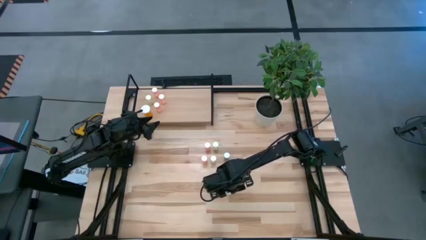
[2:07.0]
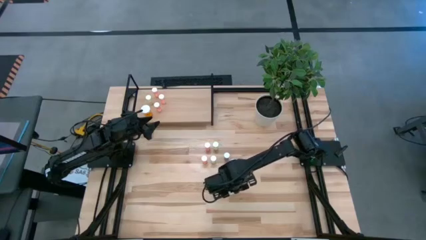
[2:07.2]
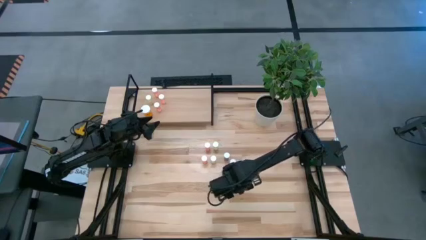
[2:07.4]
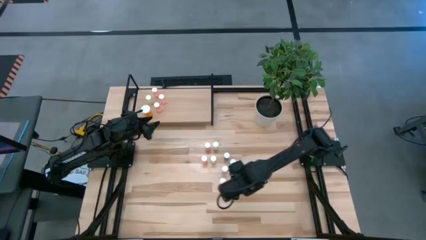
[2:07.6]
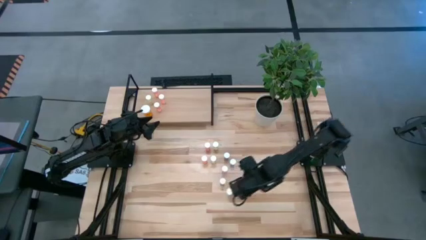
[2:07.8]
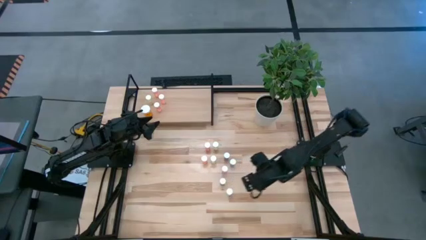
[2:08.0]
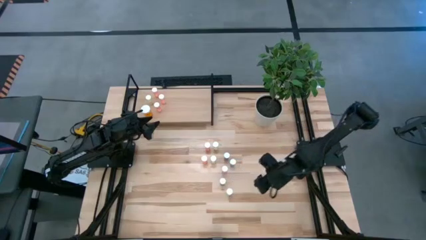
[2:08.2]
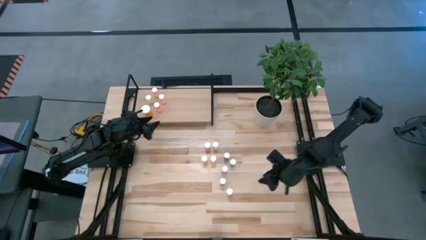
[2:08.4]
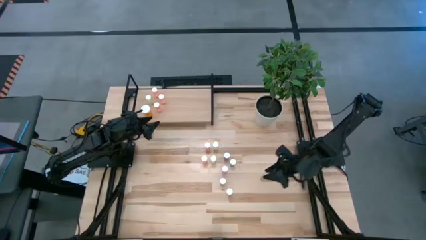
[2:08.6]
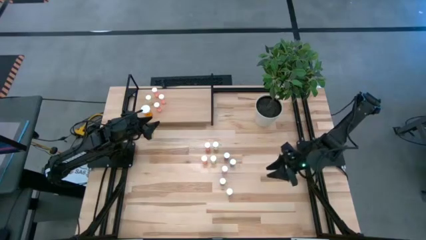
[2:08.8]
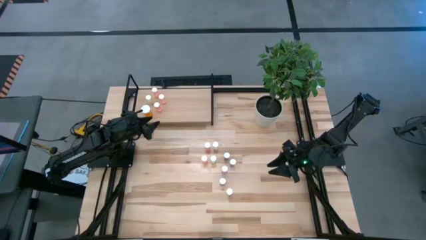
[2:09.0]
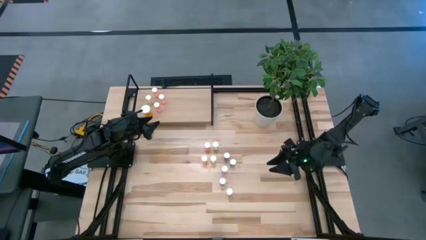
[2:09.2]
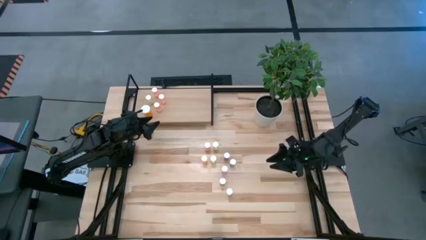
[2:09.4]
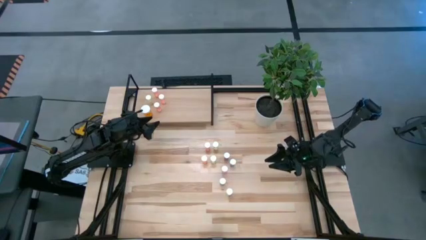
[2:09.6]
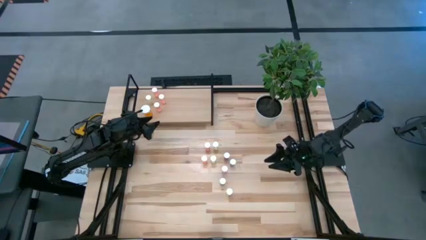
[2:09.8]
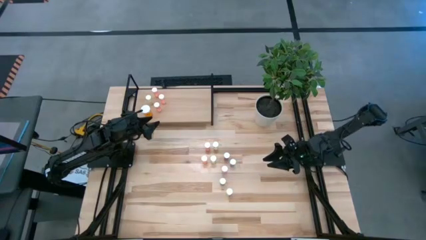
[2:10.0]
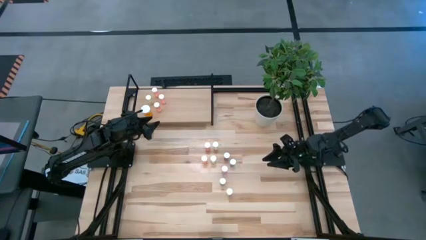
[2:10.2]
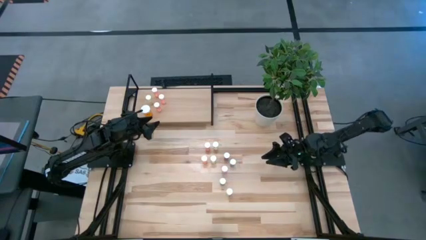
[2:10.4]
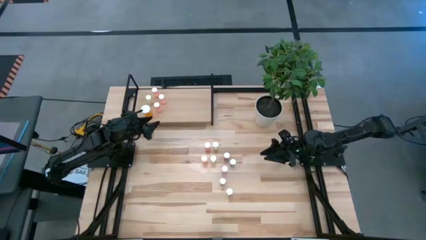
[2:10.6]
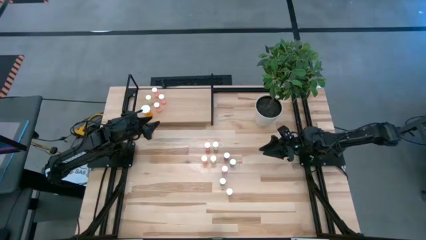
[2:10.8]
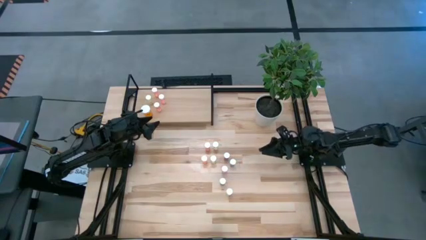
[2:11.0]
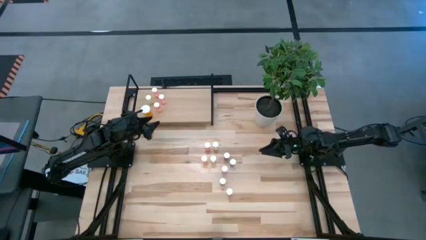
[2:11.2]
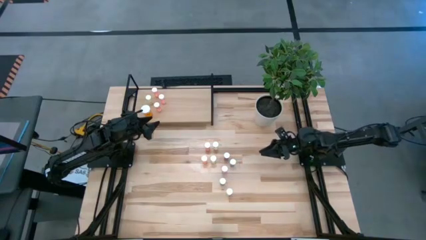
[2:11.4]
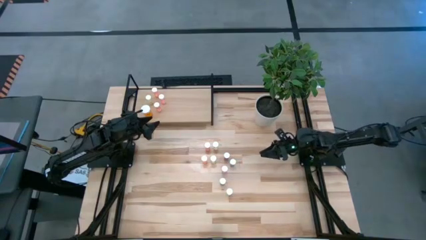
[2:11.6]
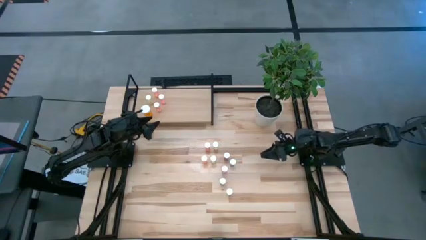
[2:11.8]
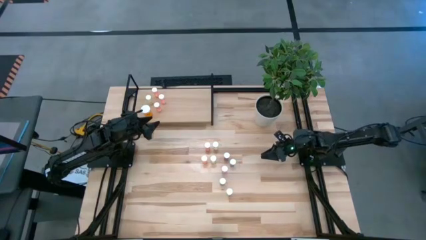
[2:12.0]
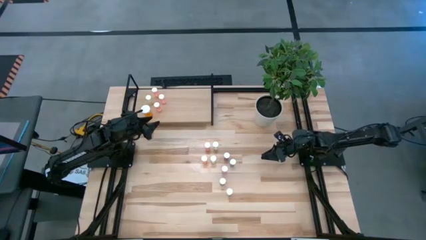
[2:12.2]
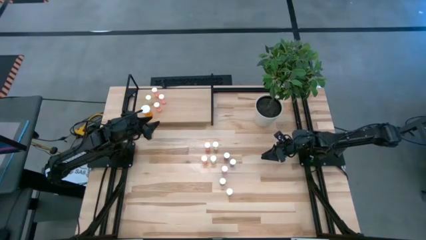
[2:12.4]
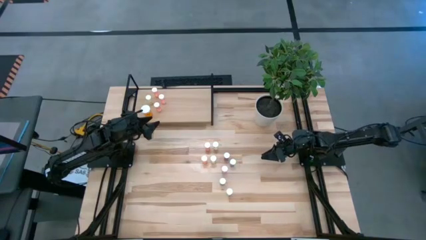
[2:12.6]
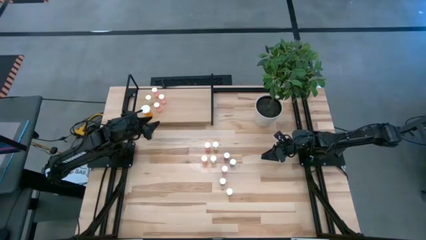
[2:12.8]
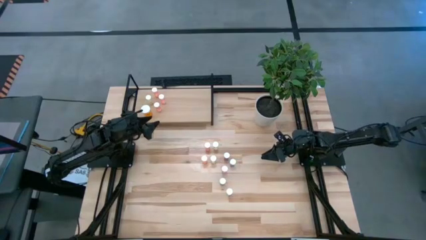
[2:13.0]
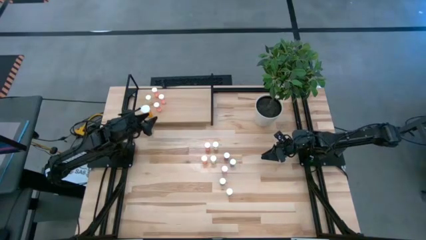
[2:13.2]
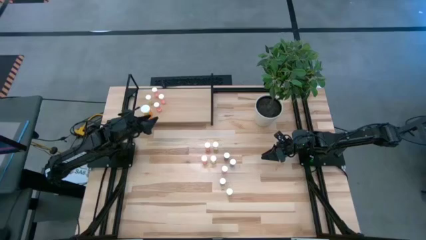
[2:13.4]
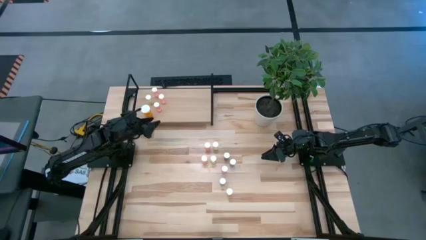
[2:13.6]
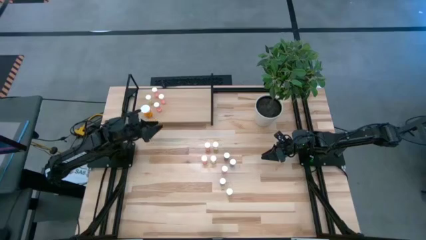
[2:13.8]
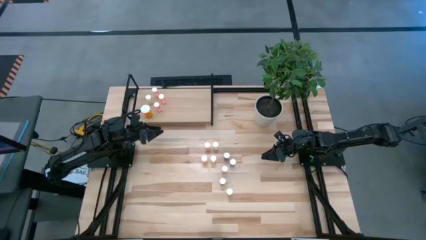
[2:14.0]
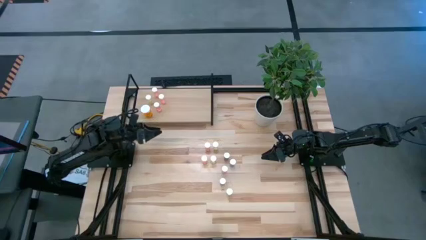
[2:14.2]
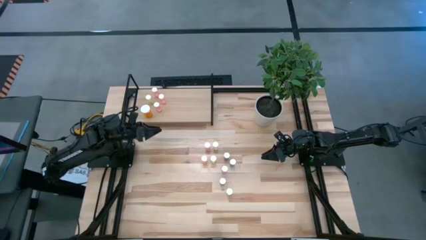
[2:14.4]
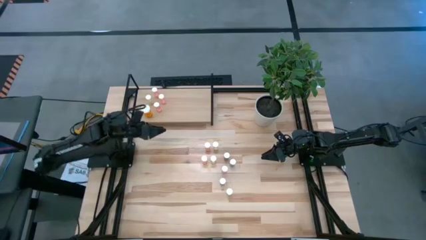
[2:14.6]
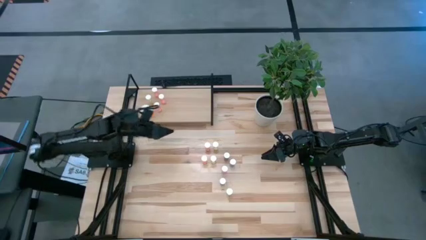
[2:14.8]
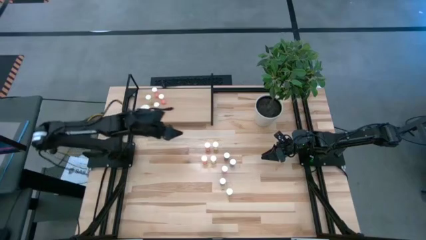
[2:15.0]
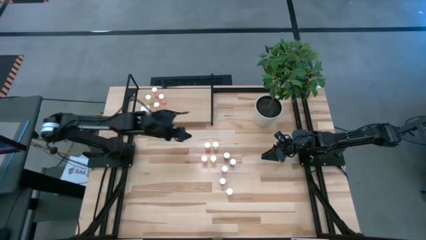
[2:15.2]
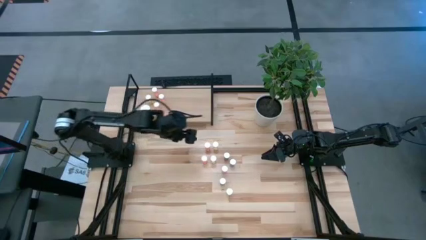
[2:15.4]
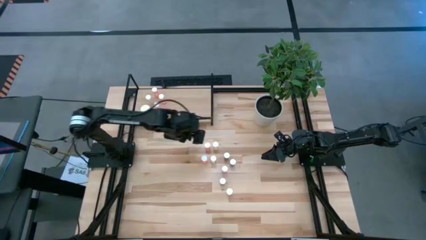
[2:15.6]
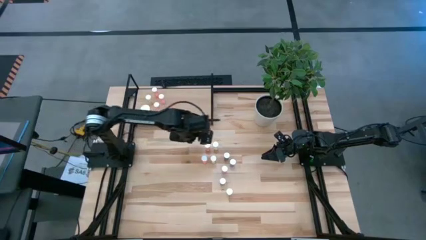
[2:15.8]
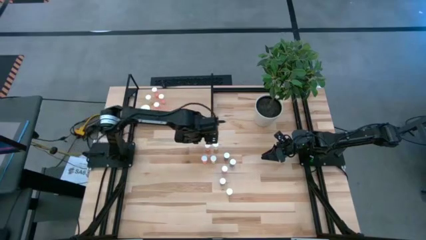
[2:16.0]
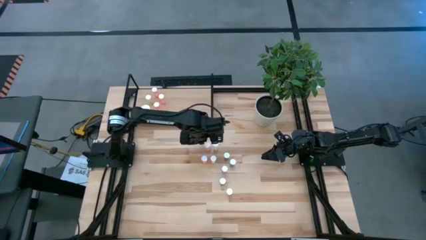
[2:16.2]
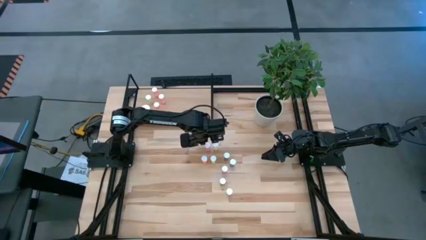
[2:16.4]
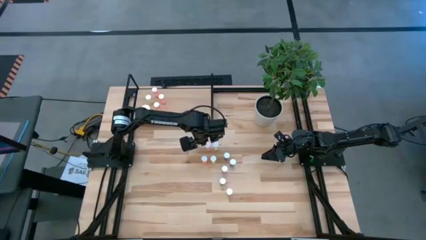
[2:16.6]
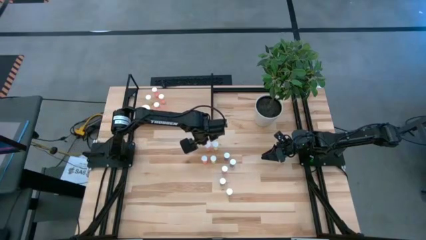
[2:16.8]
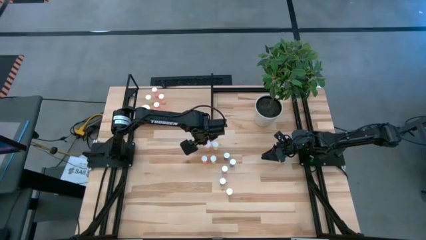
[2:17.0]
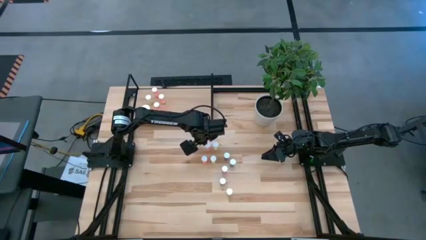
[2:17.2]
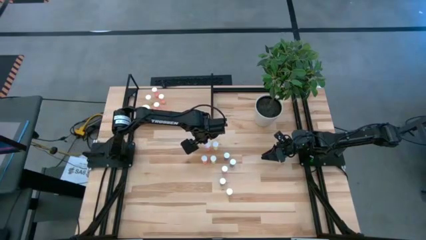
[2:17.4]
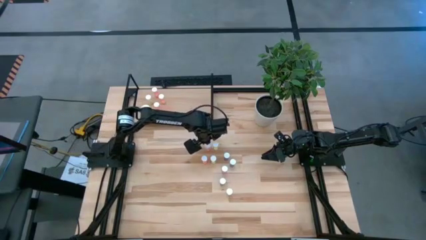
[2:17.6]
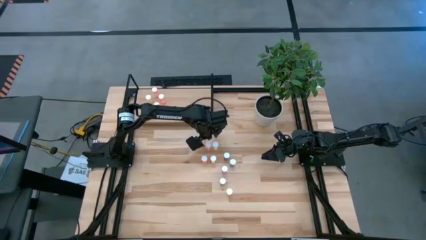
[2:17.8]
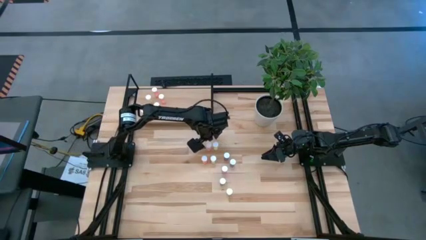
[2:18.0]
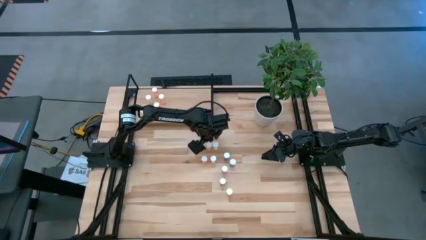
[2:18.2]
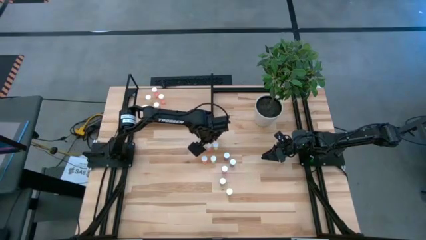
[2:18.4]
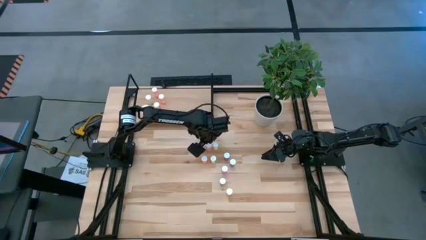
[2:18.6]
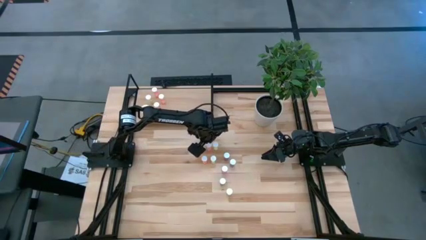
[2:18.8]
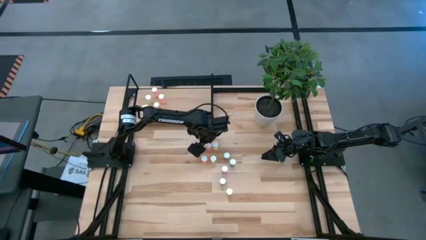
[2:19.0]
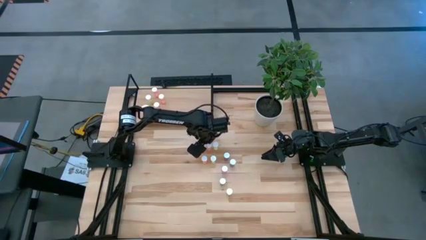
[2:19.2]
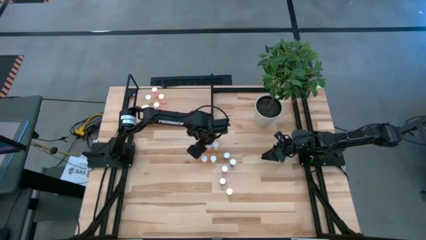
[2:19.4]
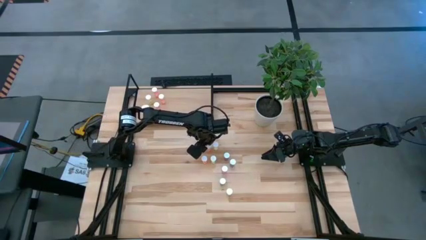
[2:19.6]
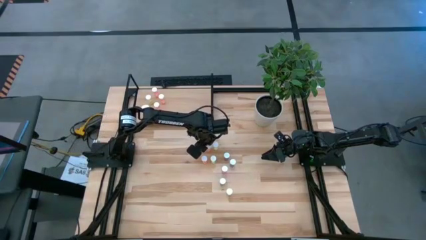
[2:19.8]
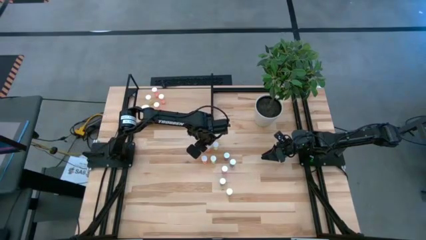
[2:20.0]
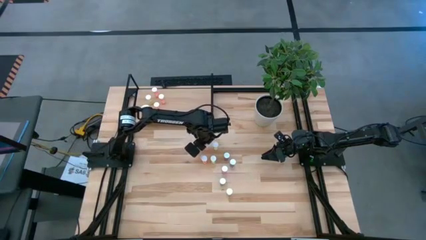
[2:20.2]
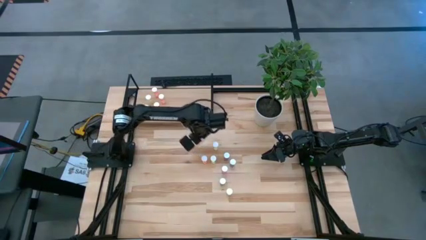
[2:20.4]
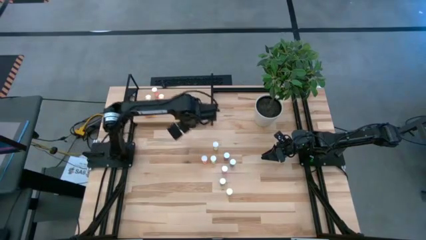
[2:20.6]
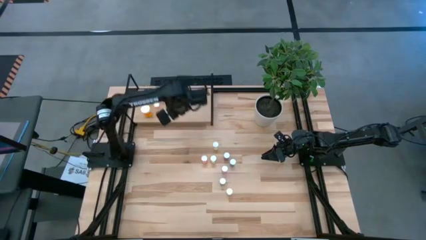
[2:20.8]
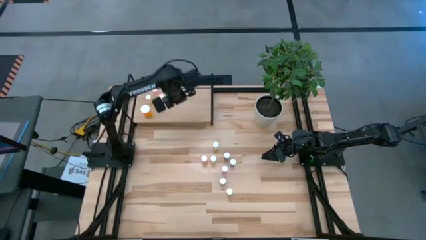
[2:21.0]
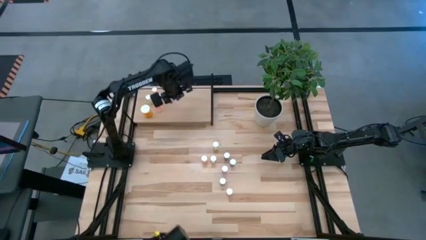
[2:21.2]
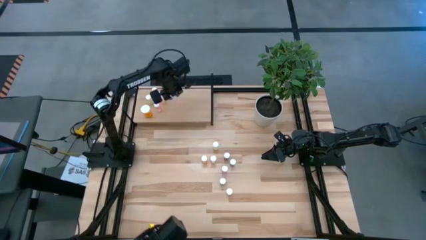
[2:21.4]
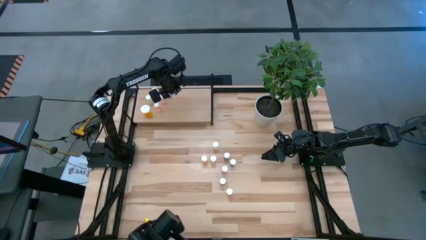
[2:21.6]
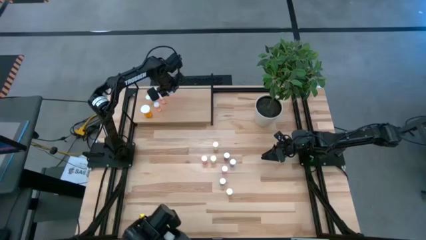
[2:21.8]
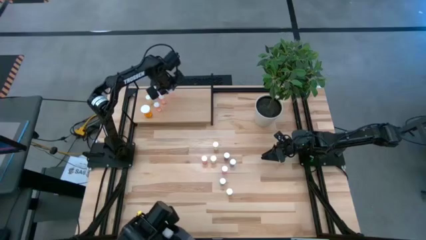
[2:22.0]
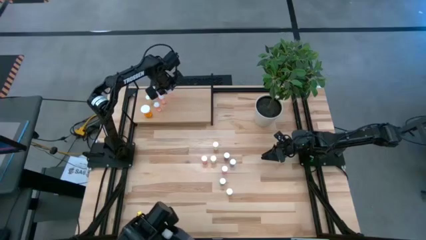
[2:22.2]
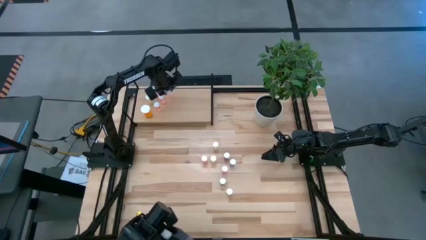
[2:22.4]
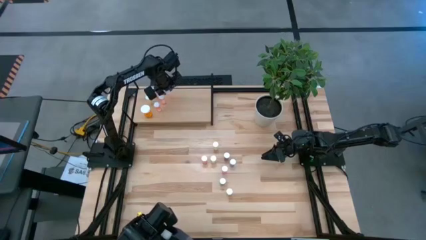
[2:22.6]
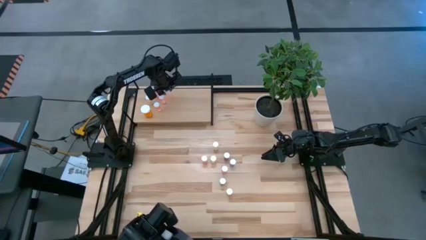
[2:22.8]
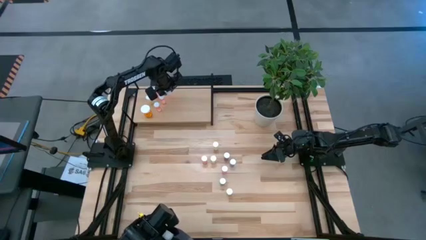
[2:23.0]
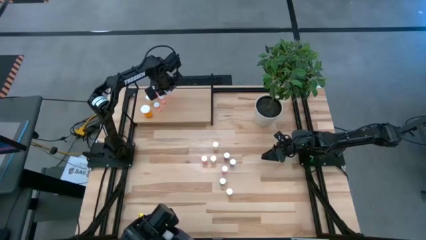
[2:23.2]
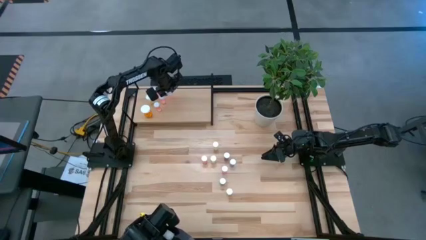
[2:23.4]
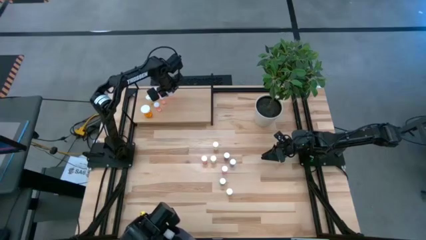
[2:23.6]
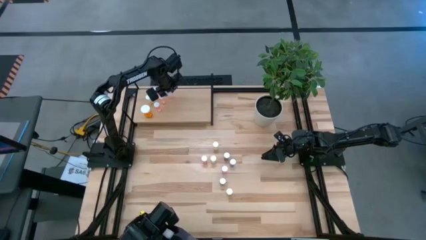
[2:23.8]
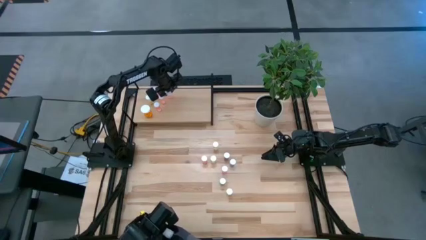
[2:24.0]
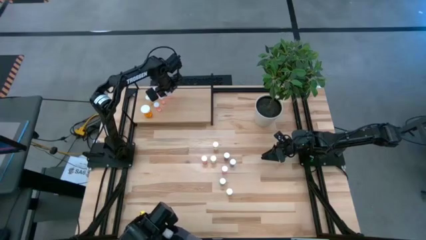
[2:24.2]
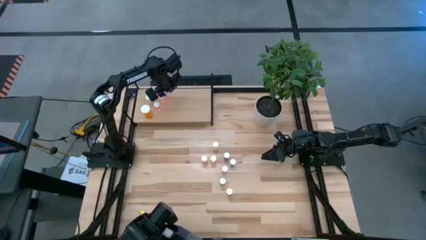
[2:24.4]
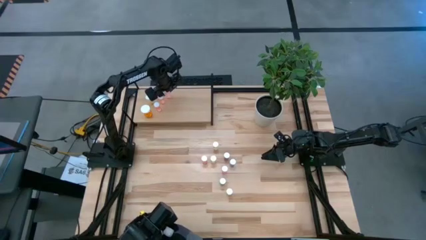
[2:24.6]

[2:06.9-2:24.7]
Task: Pick and place medicine bottles onto shelf by color
Put the orange pill bottle on the shelf
